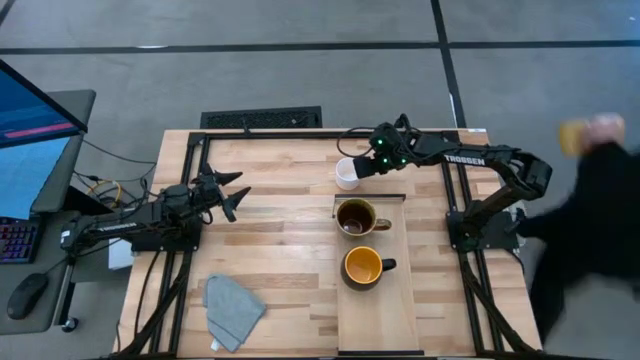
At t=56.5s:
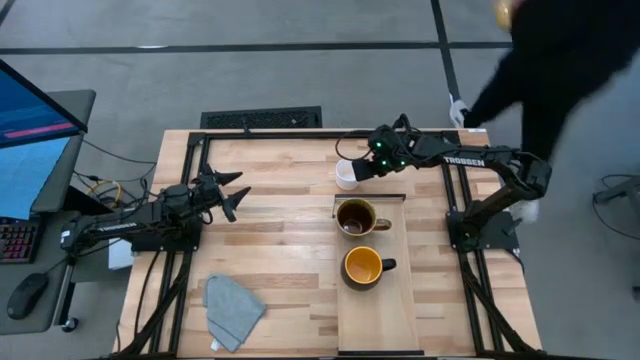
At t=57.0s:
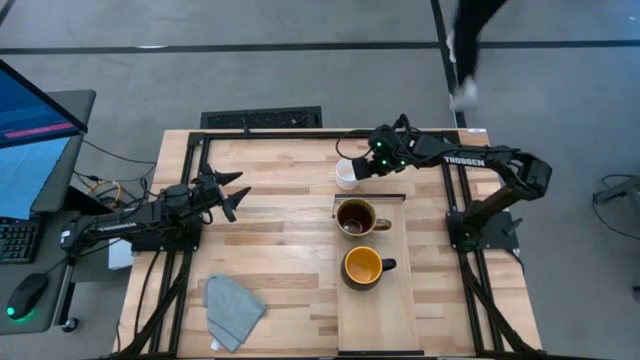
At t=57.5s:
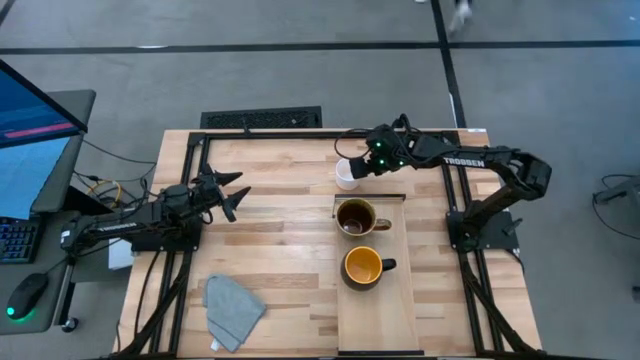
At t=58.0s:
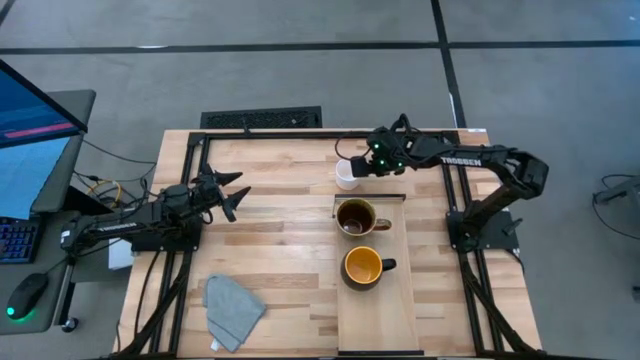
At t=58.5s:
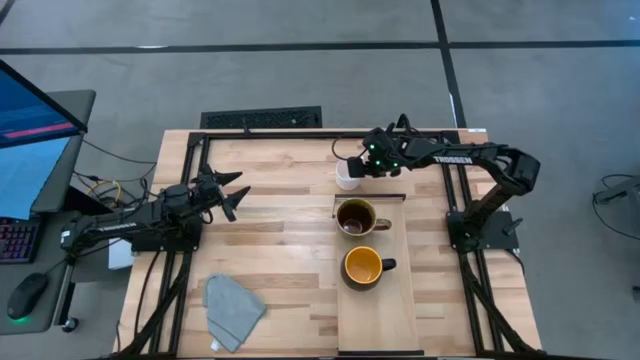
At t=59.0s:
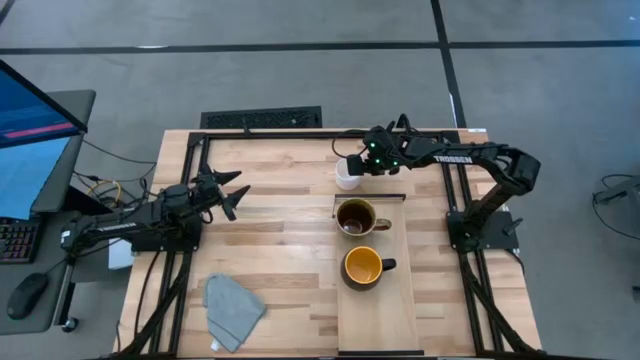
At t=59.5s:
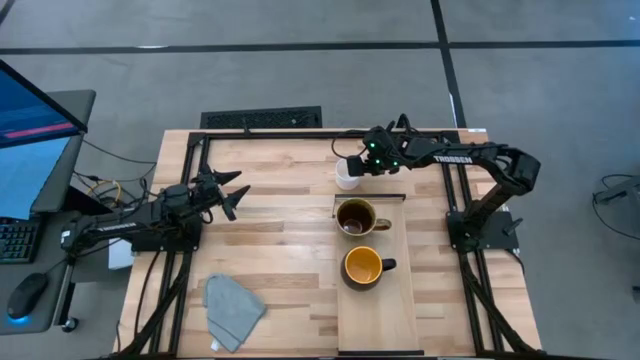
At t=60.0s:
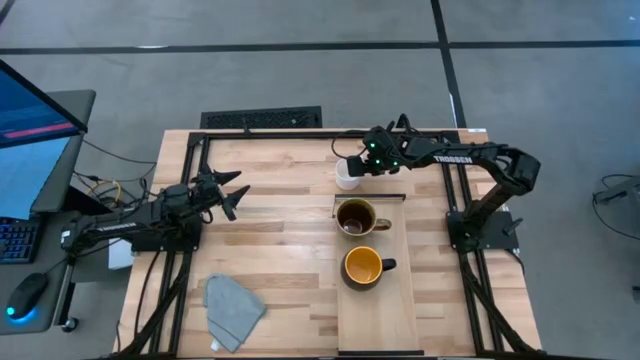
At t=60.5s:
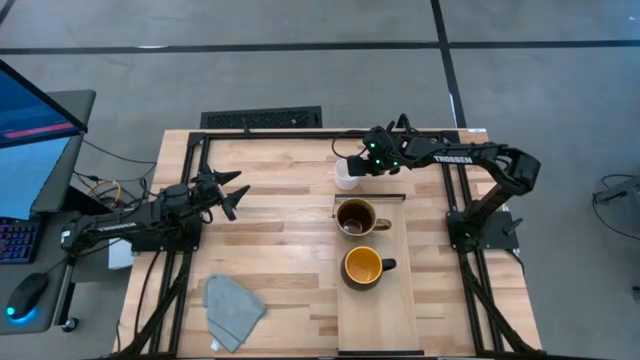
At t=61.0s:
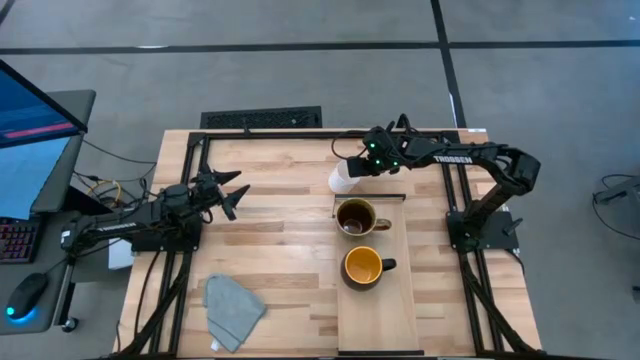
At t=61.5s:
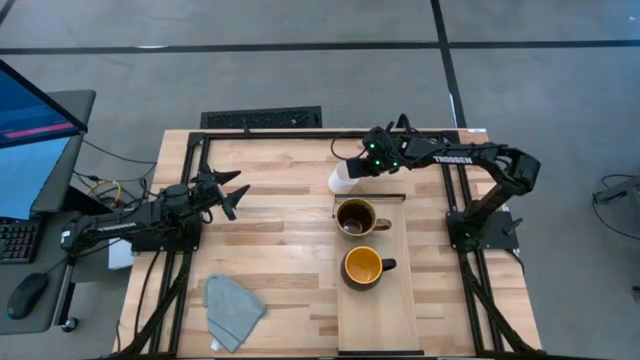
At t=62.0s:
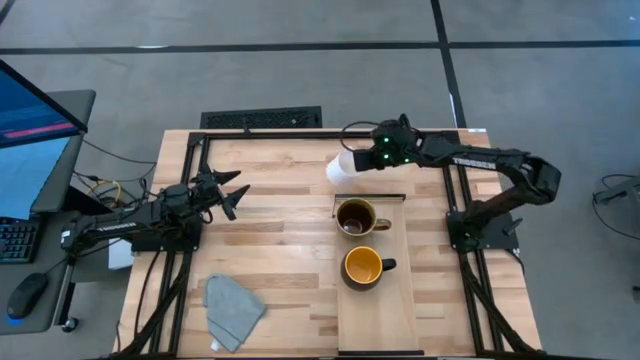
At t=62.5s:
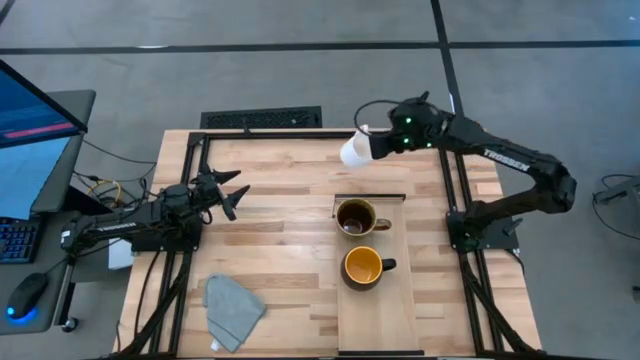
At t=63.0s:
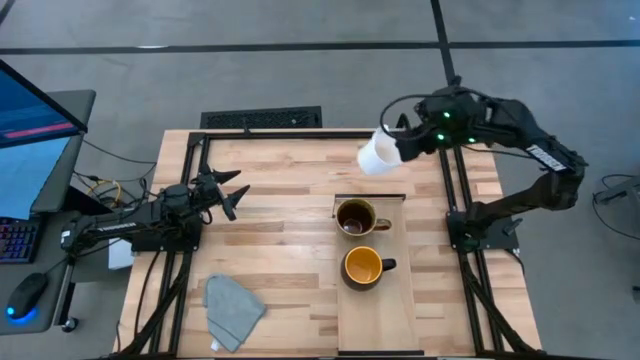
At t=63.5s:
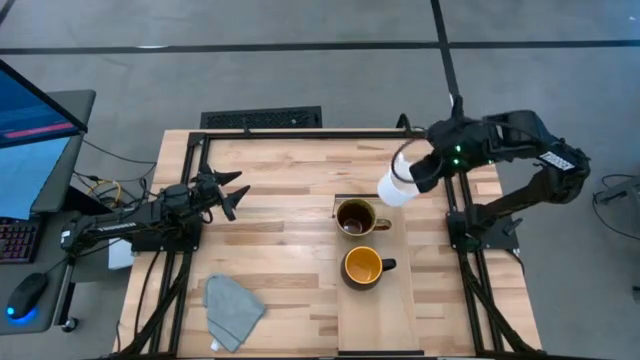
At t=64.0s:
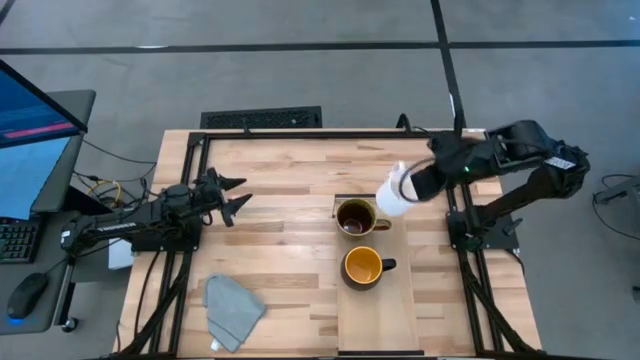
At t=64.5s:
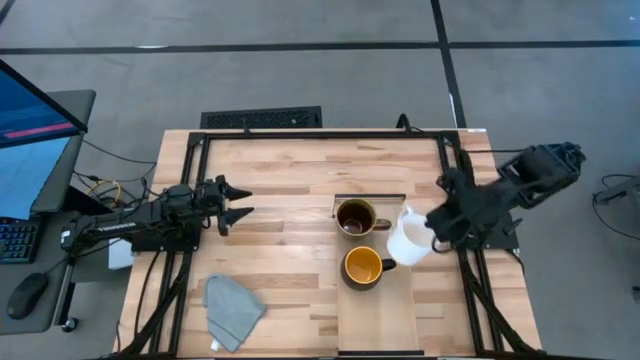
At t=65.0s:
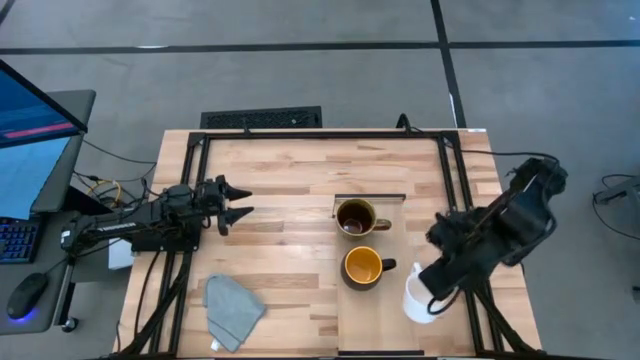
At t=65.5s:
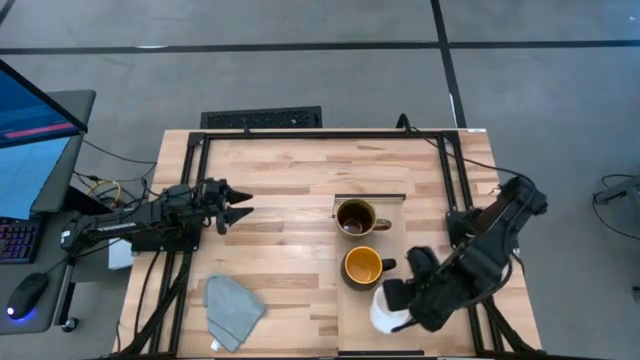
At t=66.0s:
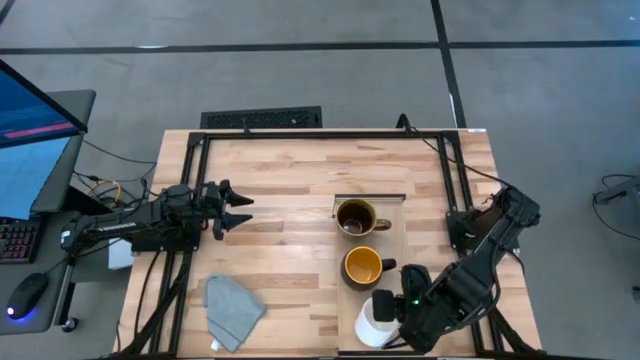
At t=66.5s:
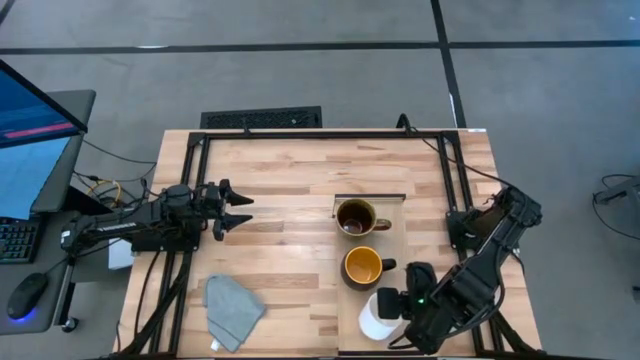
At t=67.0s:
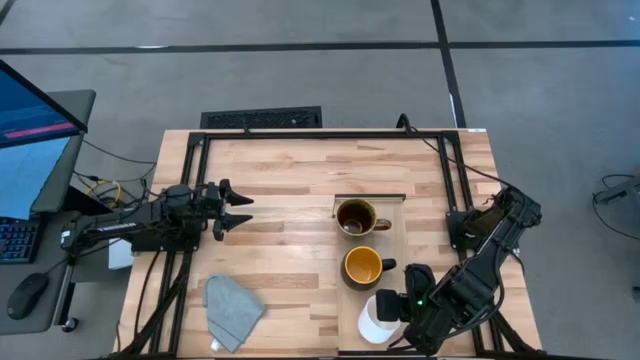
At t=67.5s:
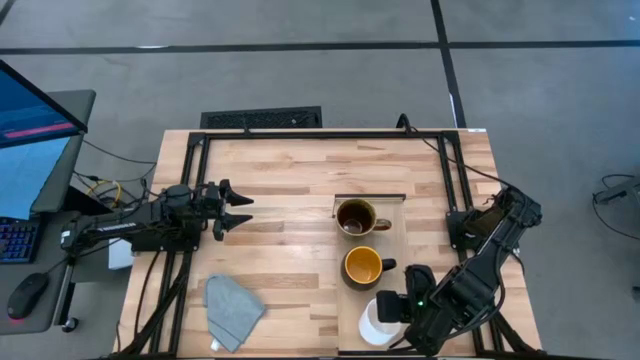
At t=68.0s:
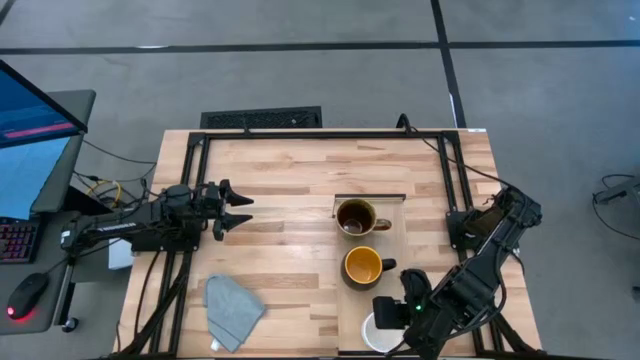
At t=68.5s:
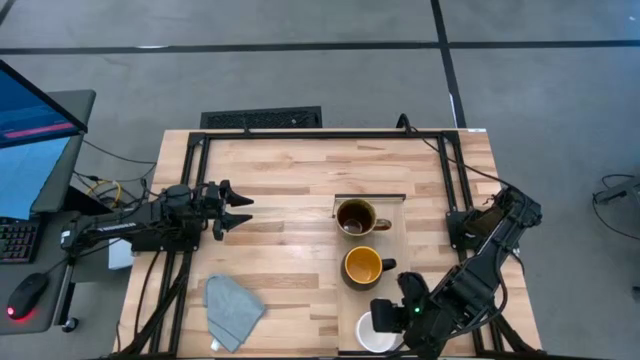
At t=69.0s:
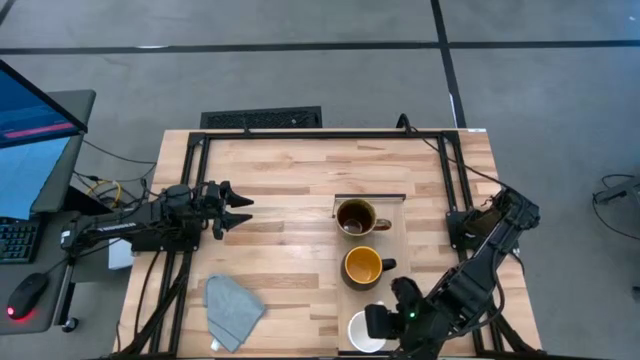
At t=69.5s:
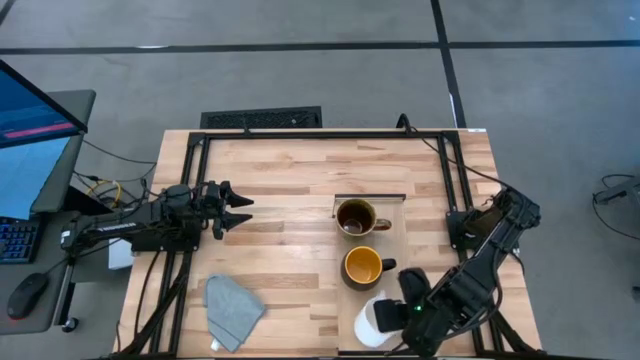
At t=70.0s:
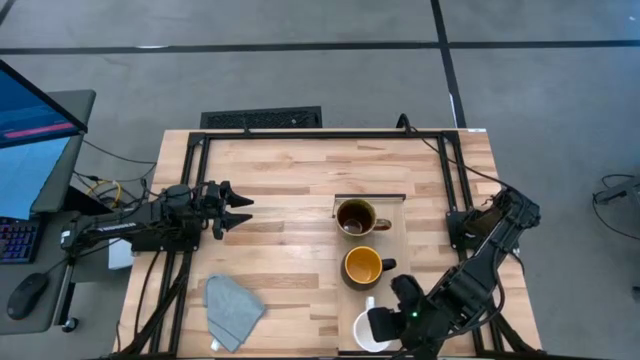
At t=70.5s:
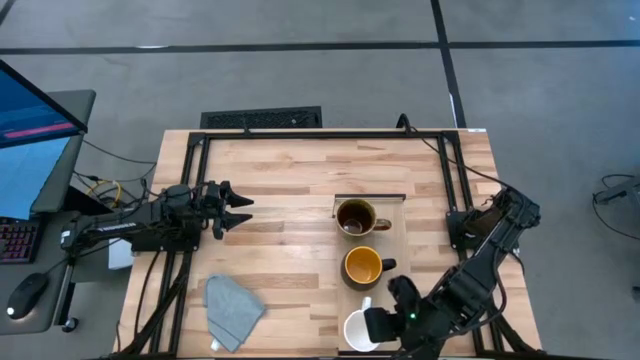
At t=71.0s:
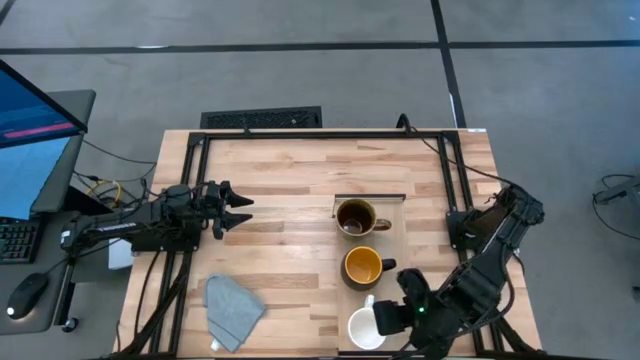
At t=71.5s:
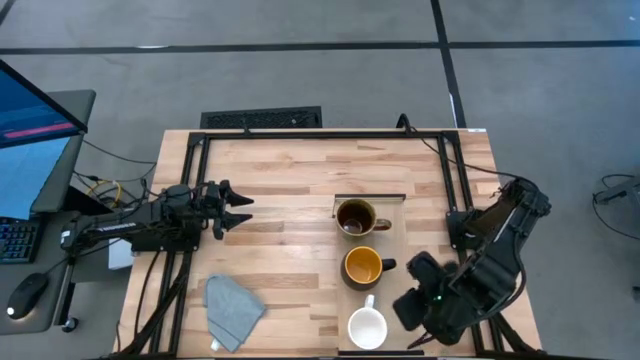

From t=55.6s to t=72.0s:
Task: Stack small to large cups/mugs on shelf
Put the white mug on the shelf

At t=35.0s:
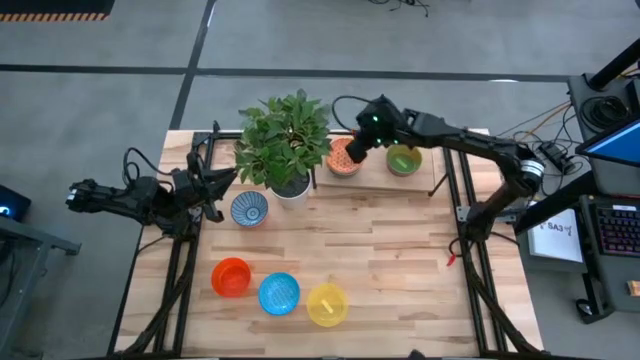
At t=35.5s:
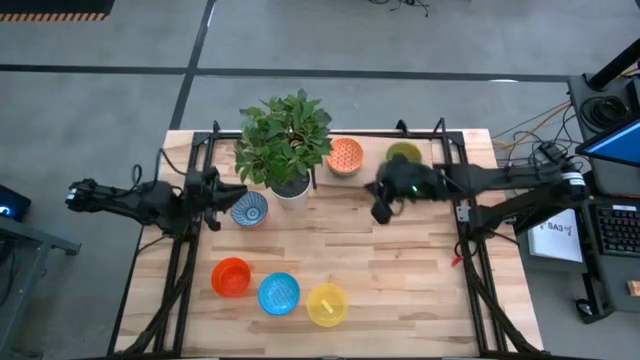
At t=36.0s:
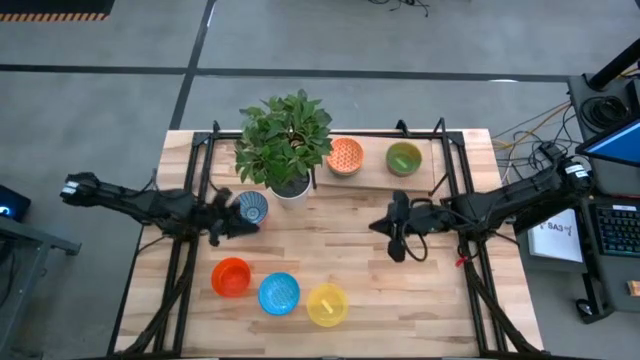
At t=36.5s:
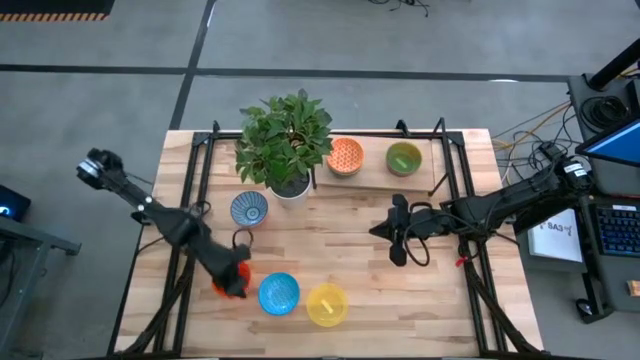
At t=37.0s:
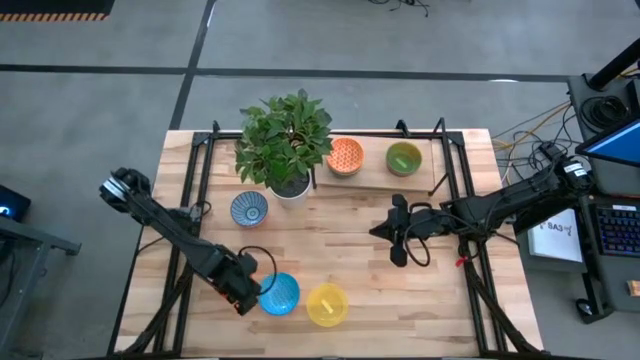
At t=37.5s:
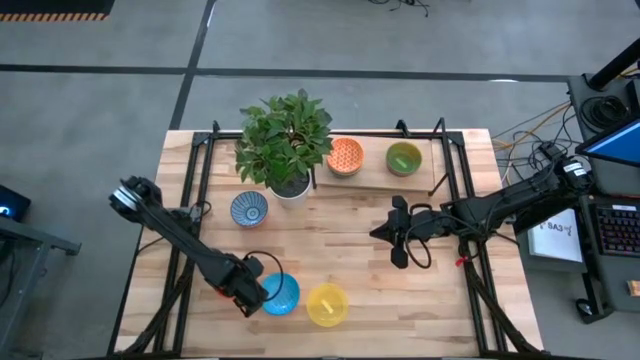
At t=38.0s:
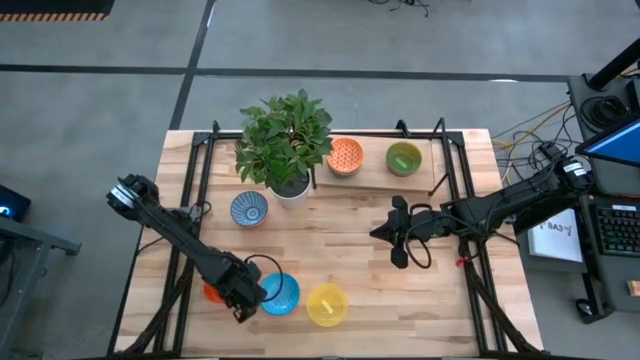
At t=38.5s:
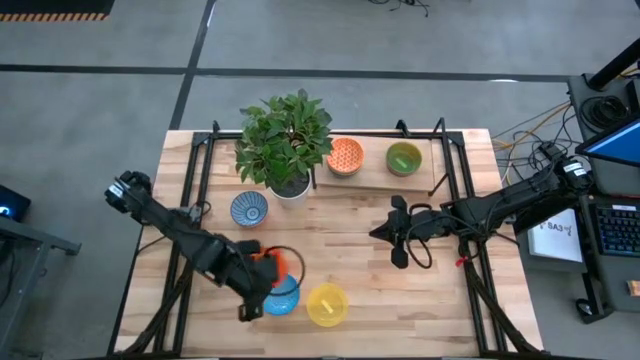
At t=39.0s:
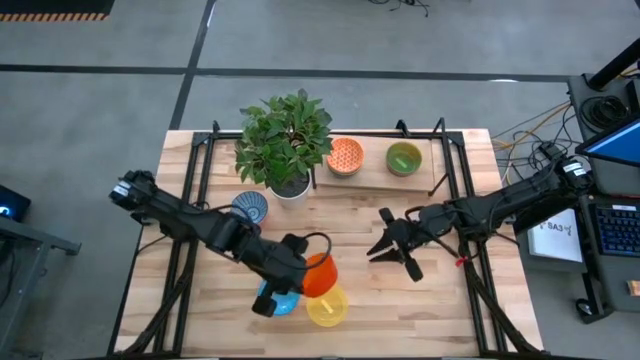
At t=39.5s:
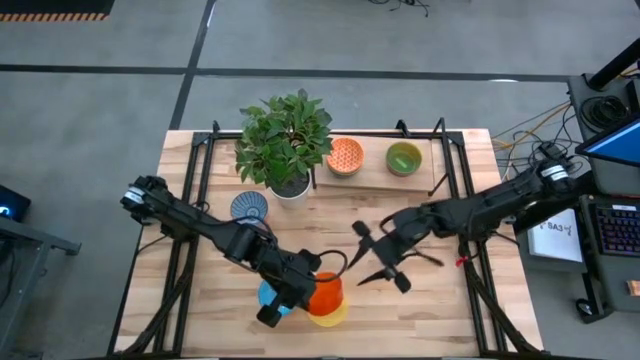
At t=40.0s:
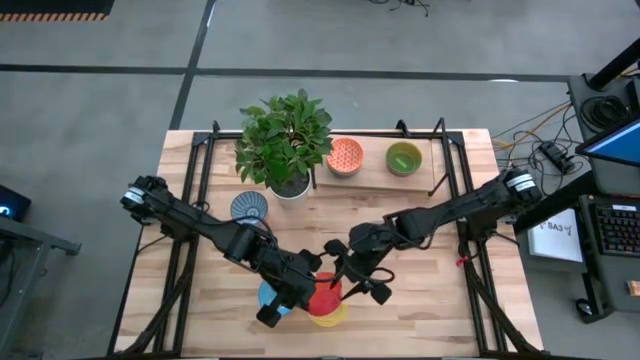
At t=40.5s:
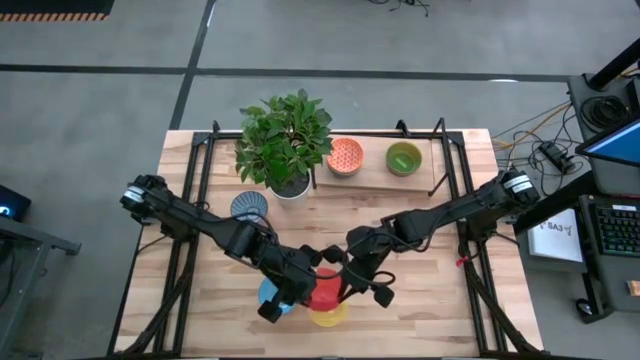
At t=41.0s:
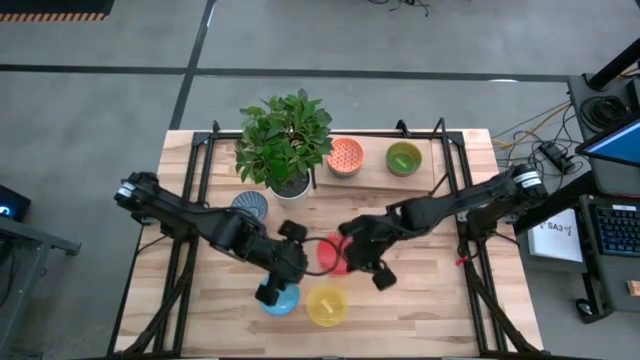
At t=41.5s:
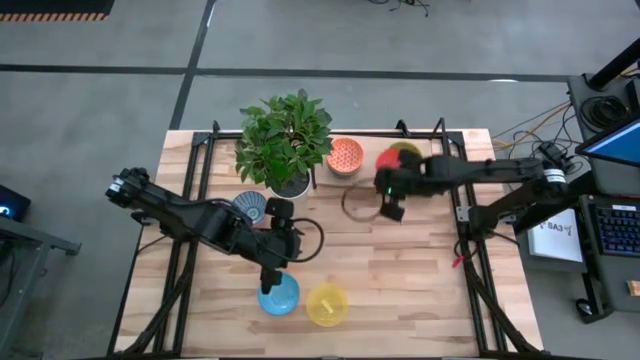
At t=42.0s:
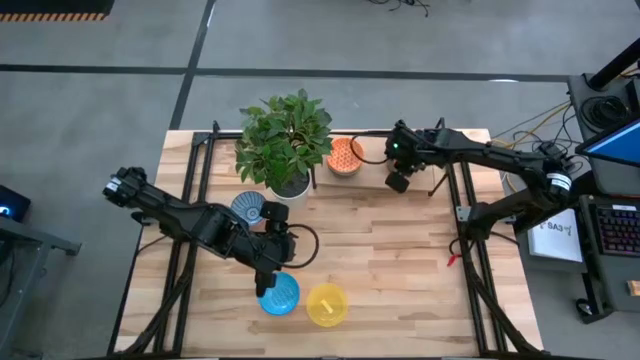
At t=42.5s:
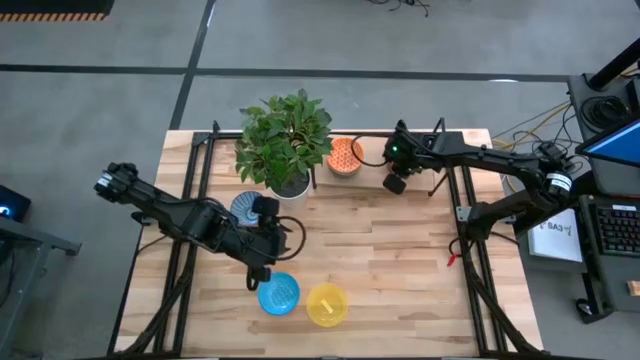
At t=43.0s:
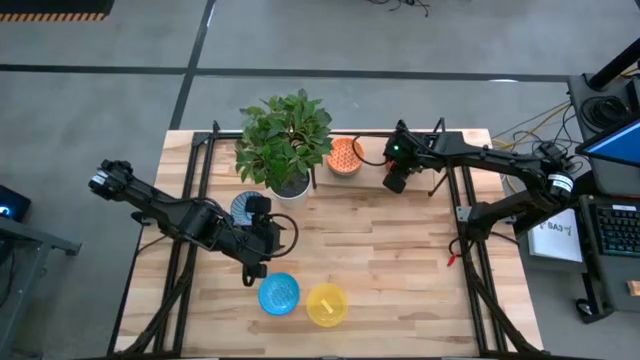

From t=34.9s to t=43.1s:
Task: Place and stack bowls onto a shelf
Stack the orange bowl on the green bowl on the shelf
